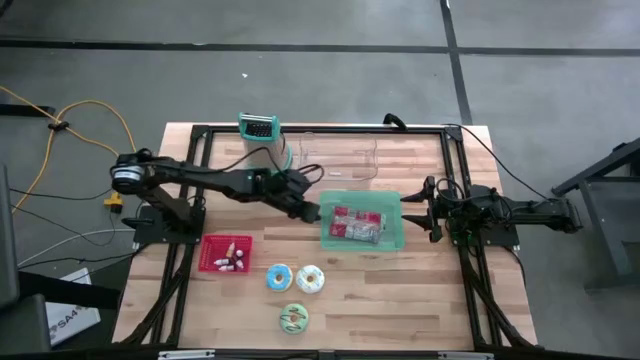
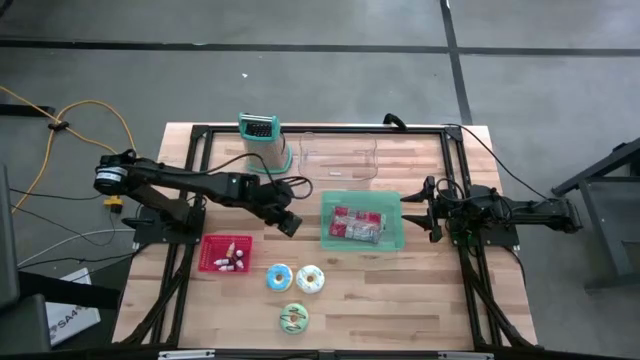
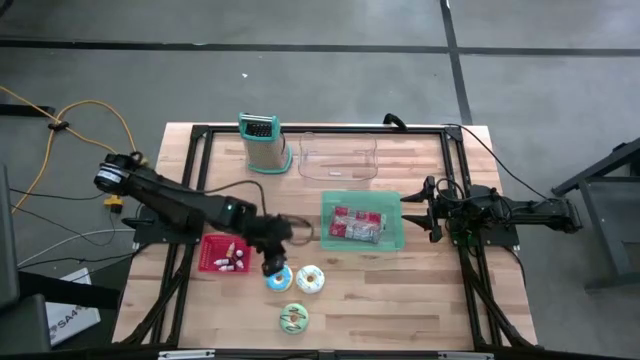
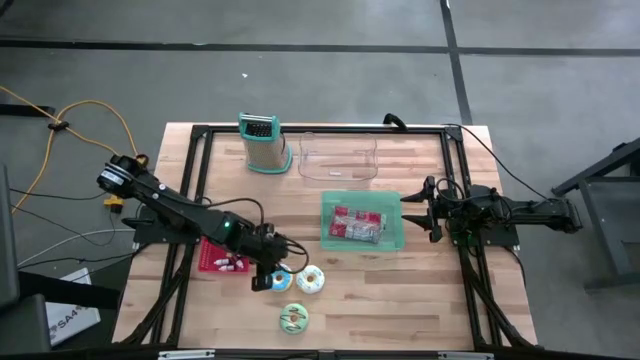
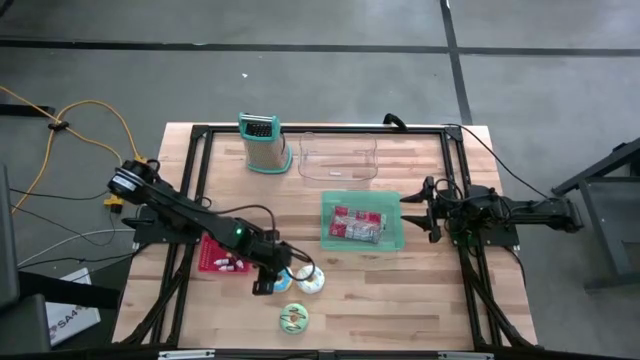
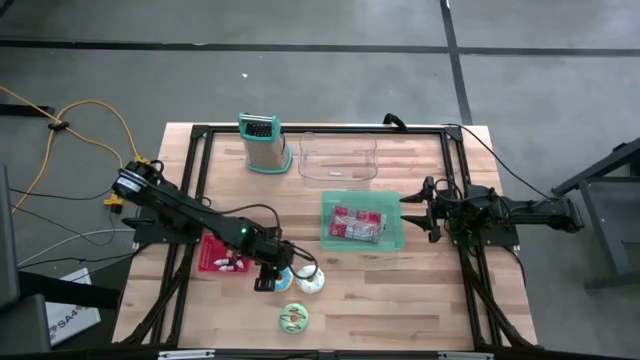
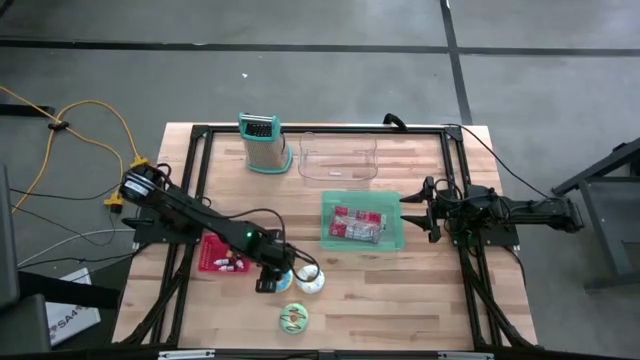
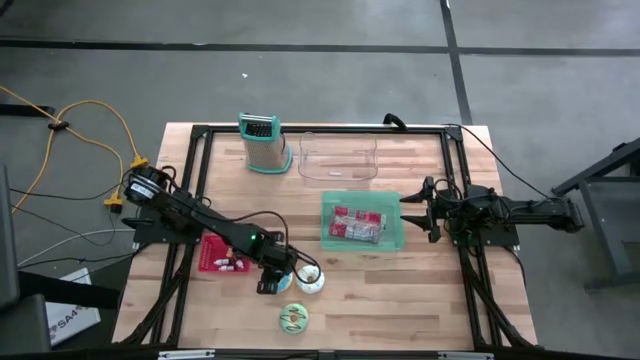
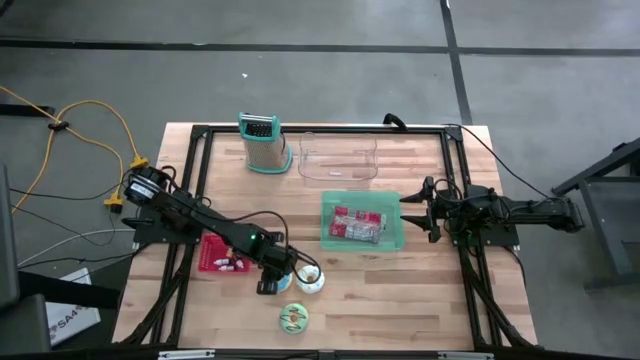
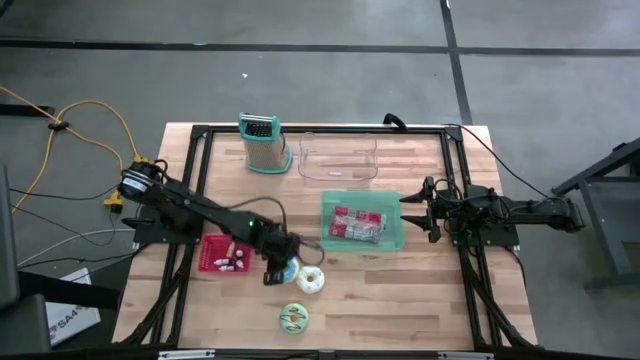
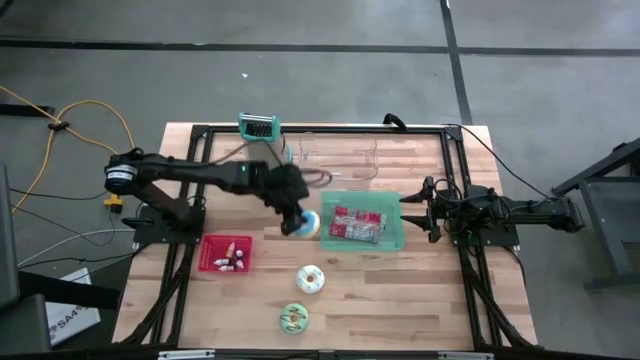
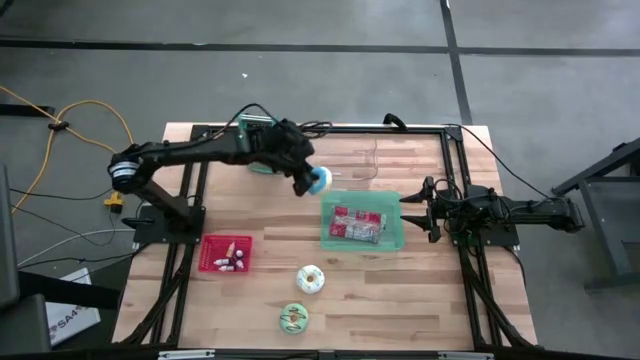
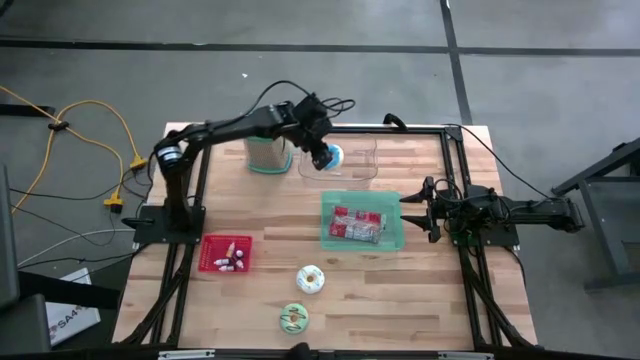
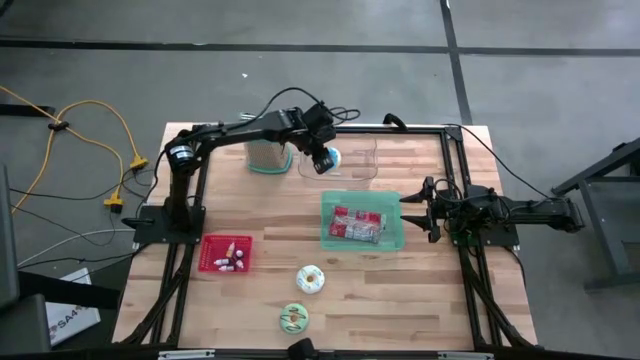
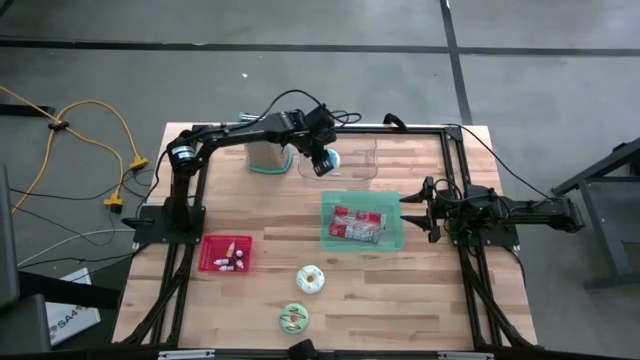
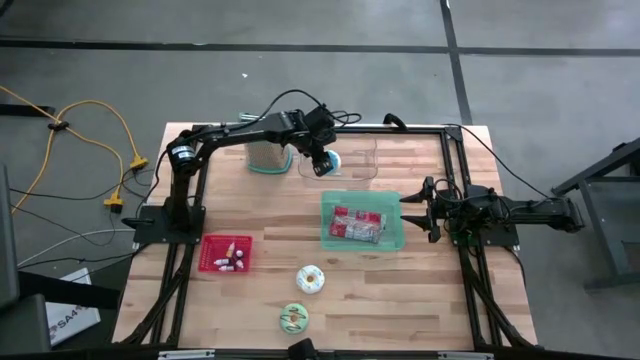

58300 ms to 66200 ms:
Put the blue donut into the transparent bin

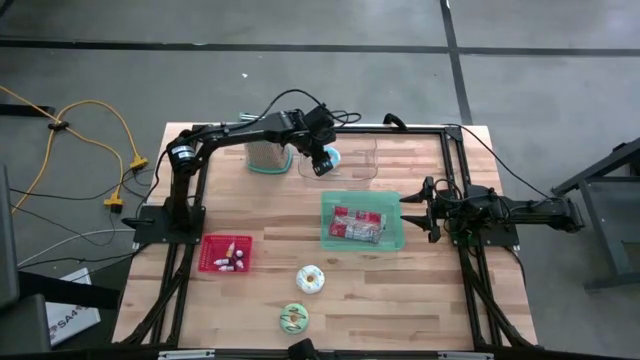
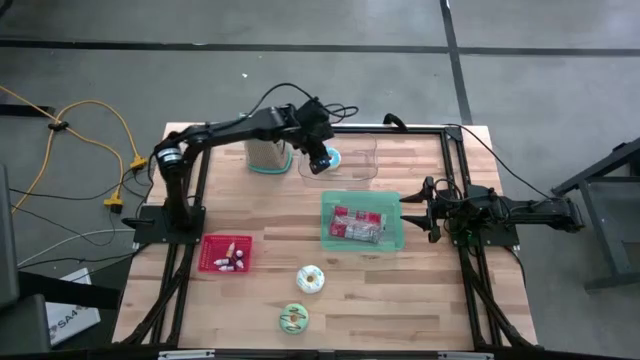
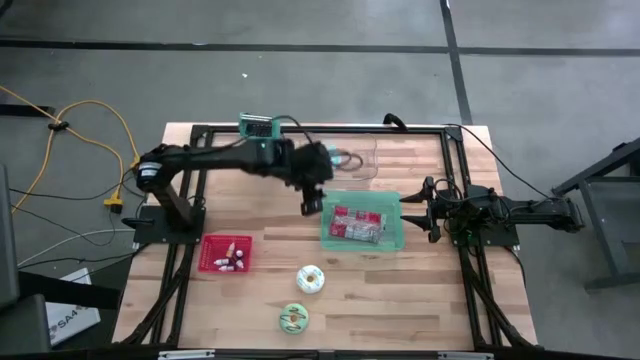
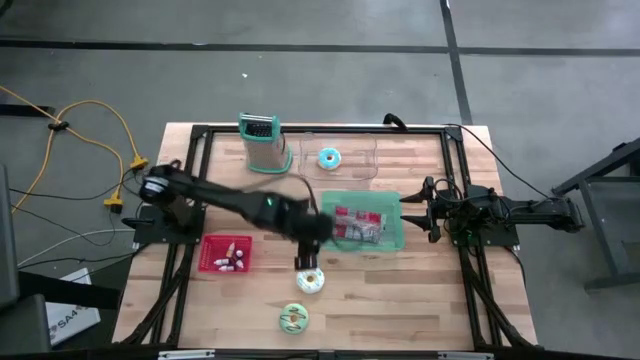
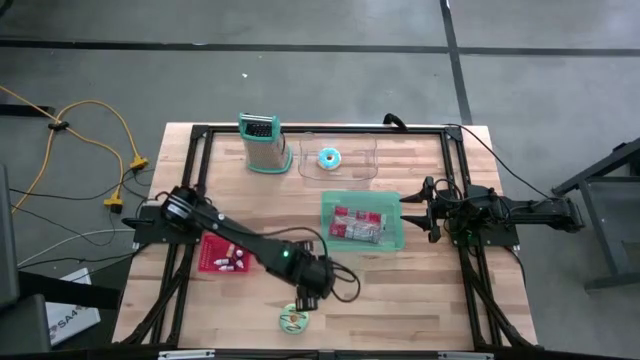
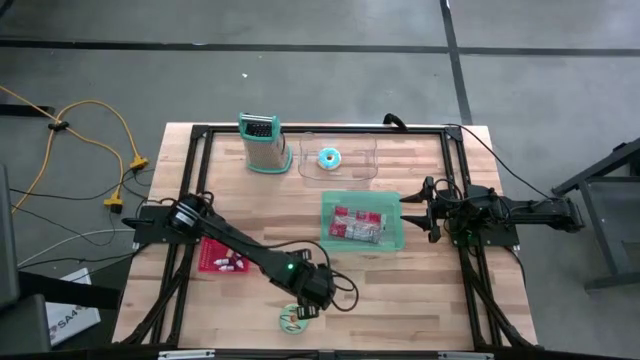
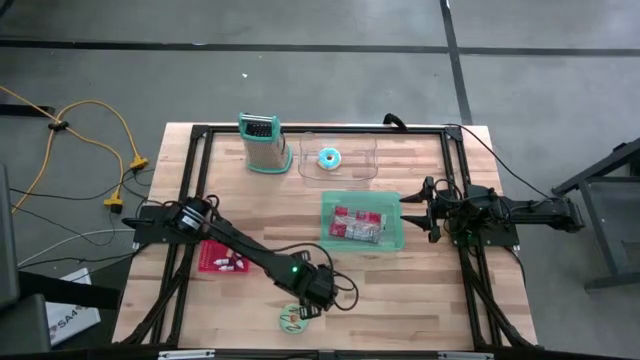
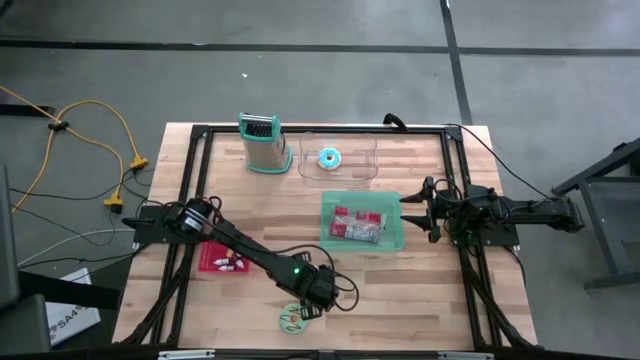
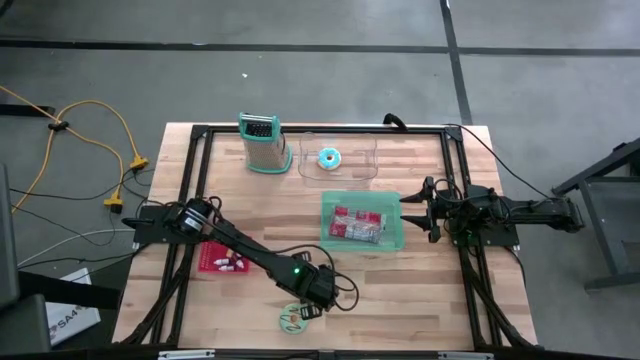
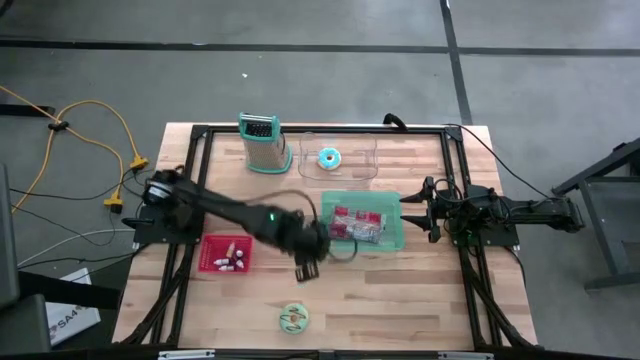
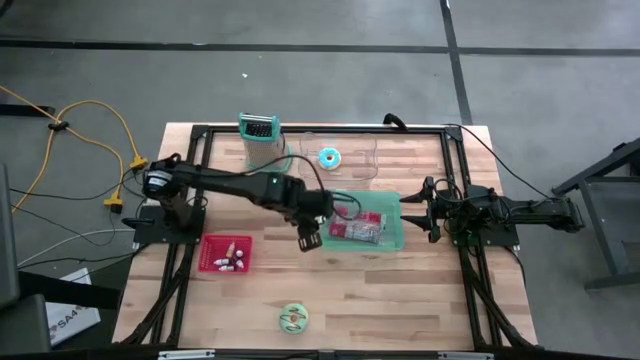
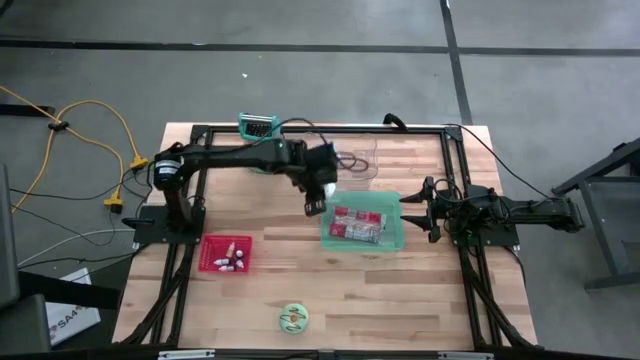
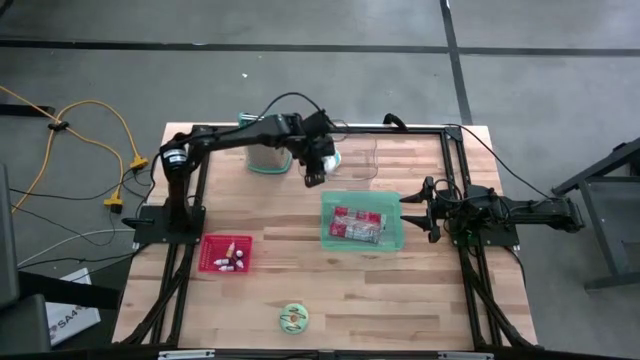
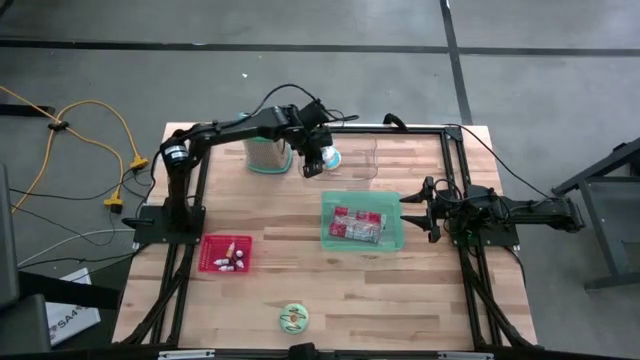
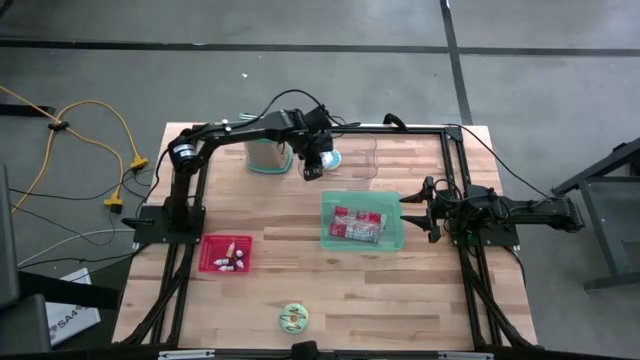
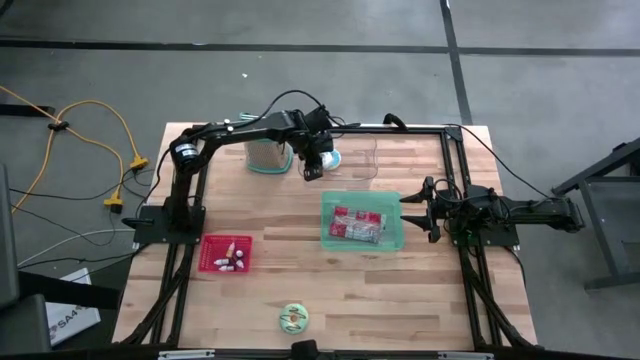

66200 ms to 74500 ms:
Put the white donut into the transparent bin

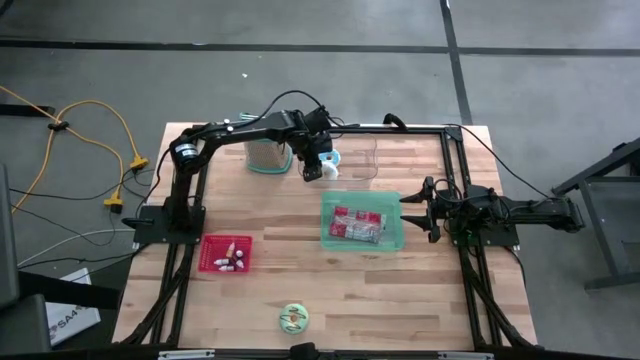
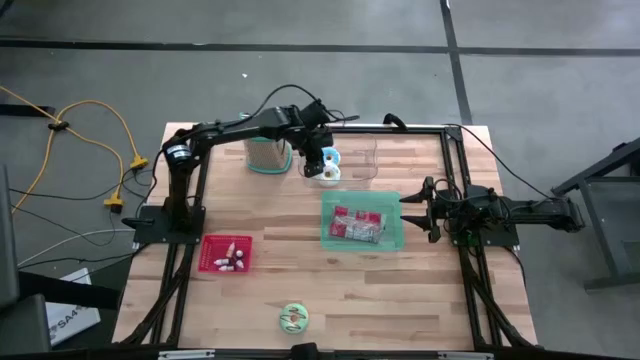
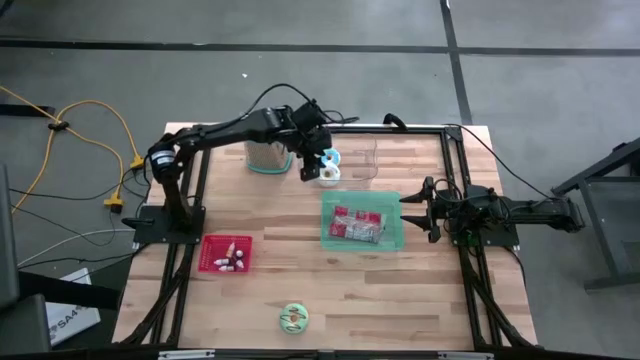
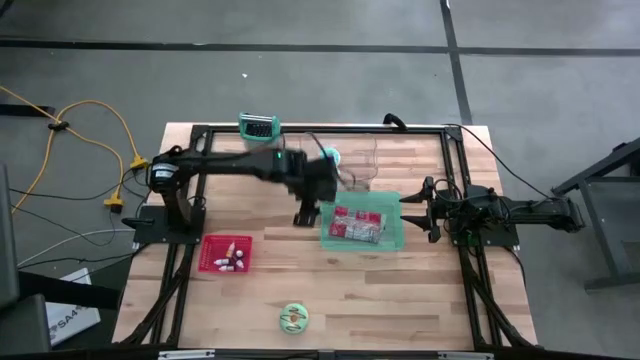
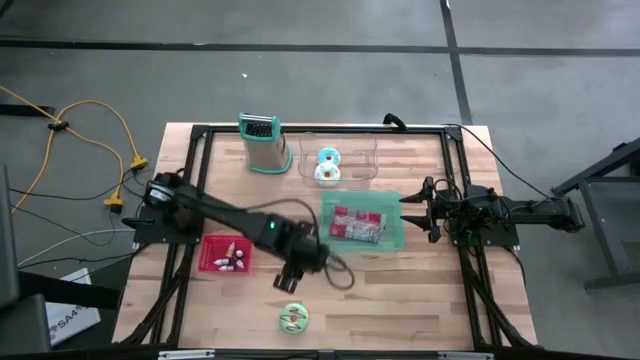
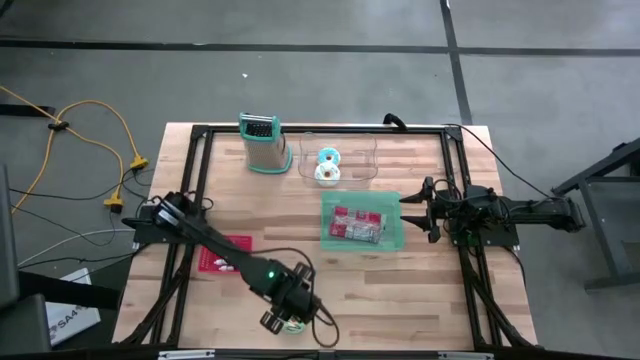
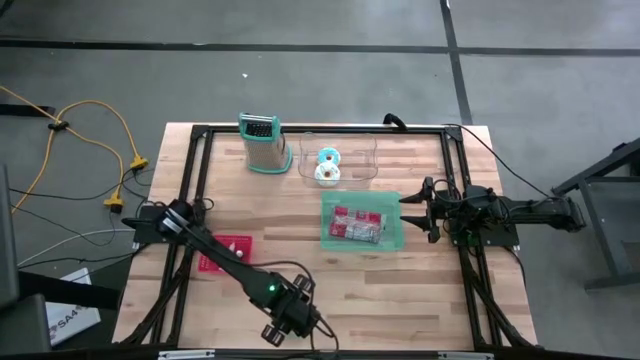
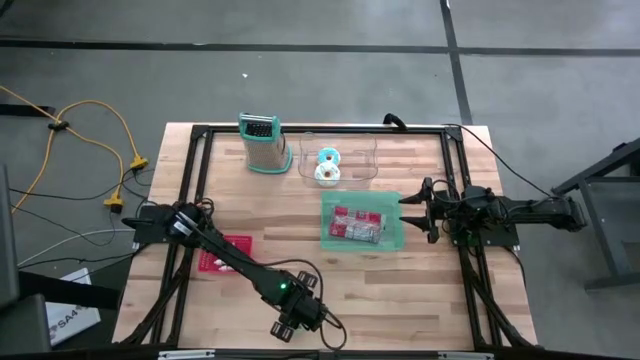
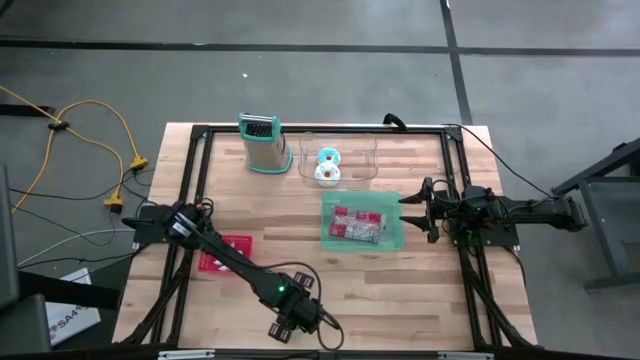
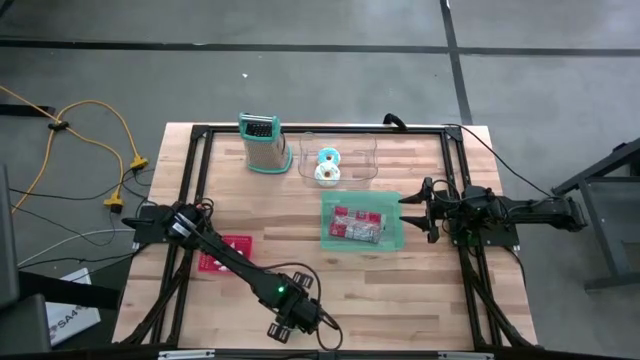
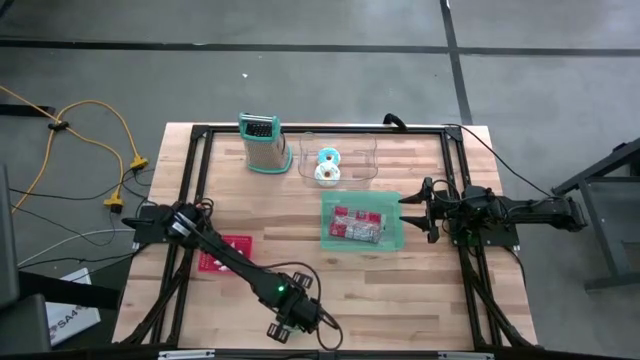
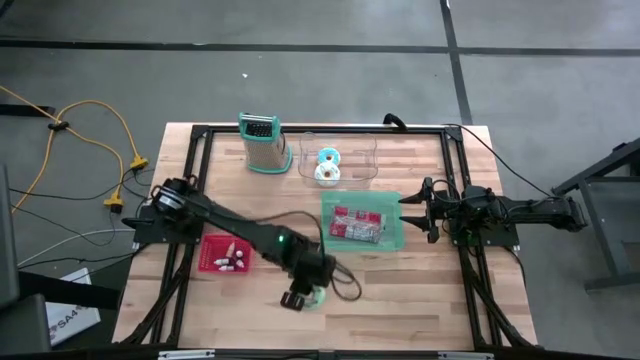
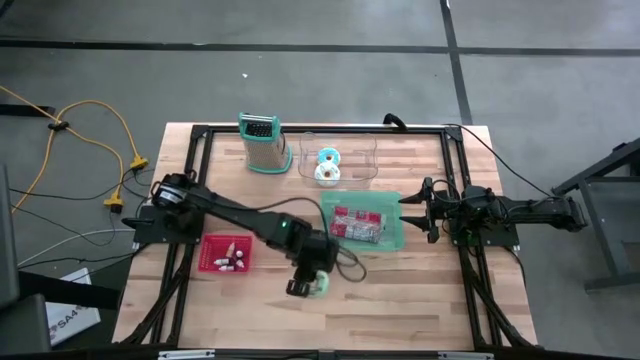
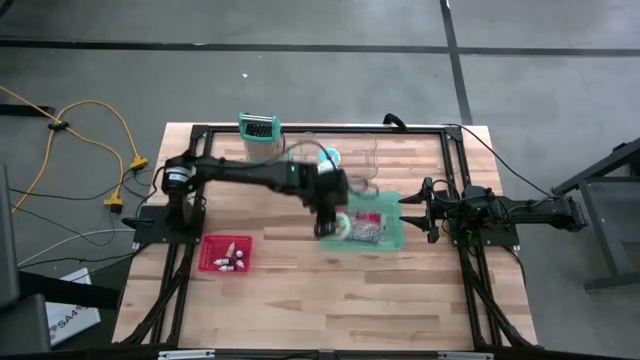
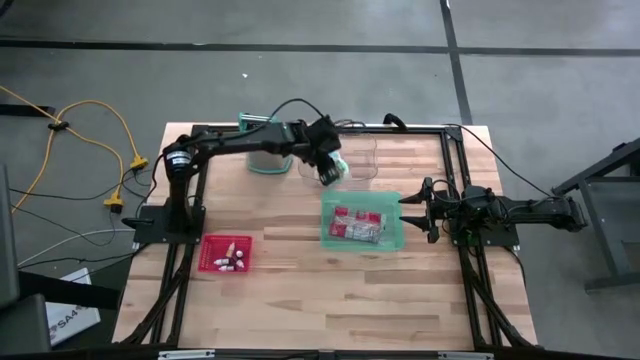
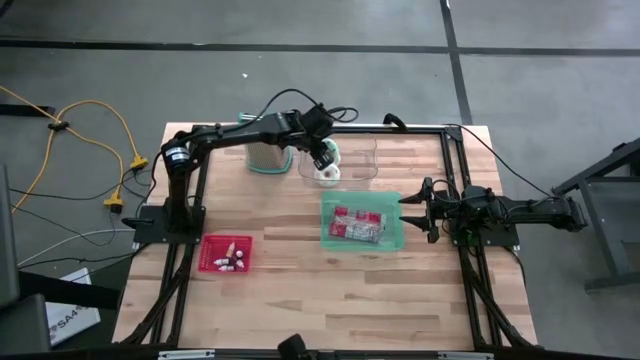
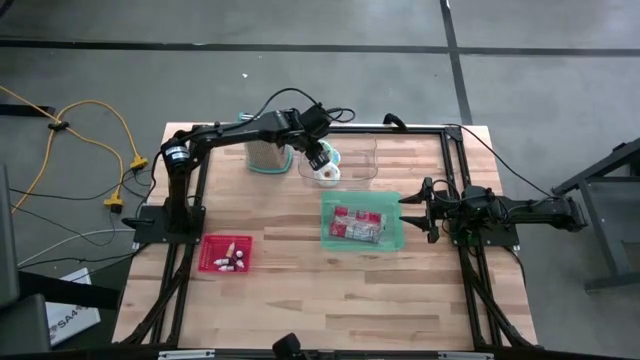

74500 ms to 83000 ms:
Put the green donut into the transparent bin
